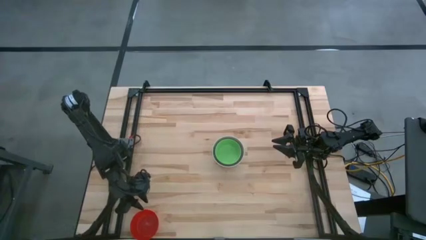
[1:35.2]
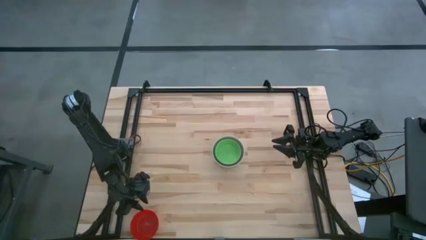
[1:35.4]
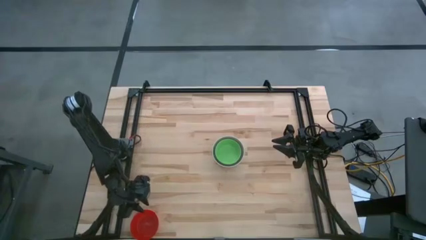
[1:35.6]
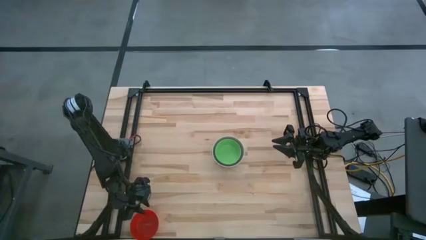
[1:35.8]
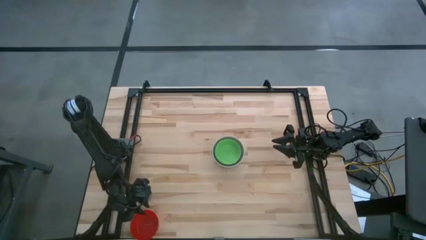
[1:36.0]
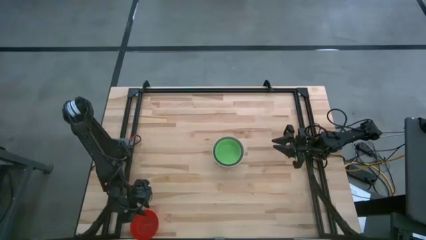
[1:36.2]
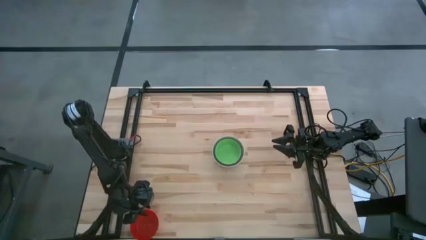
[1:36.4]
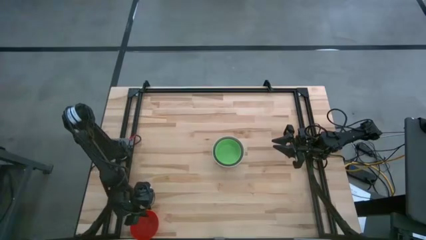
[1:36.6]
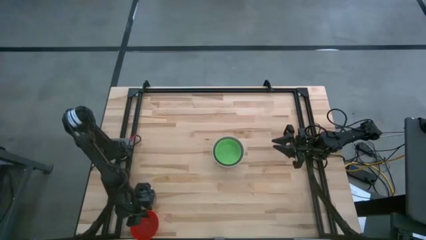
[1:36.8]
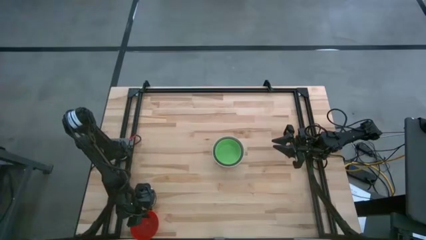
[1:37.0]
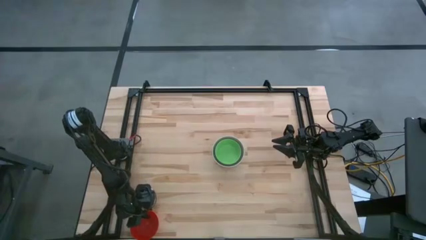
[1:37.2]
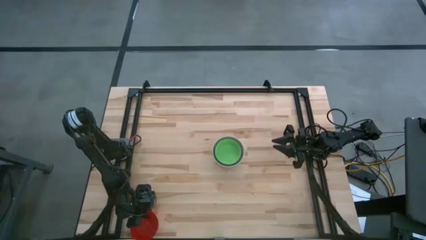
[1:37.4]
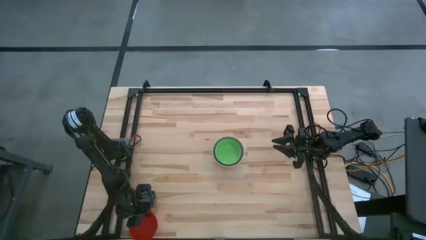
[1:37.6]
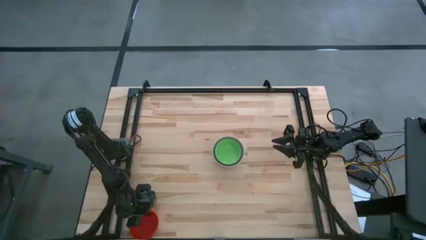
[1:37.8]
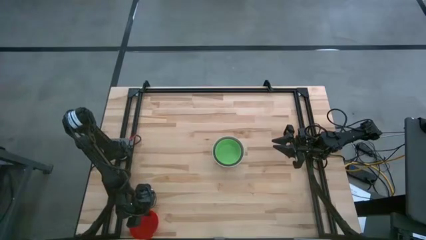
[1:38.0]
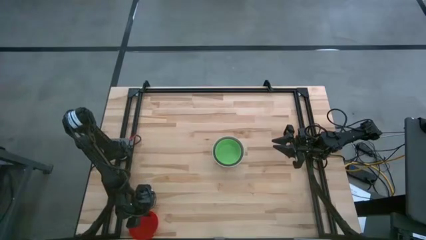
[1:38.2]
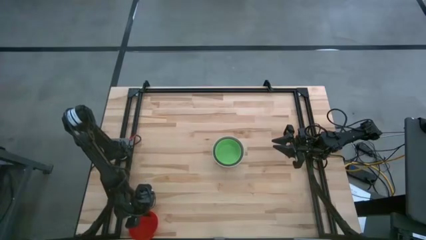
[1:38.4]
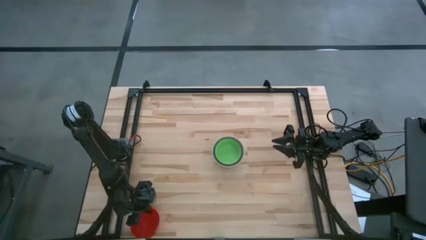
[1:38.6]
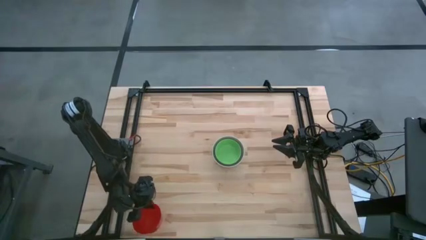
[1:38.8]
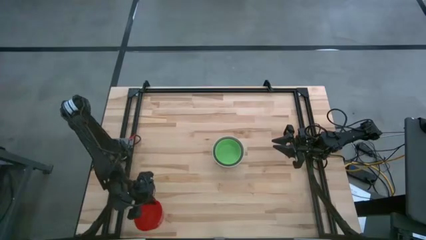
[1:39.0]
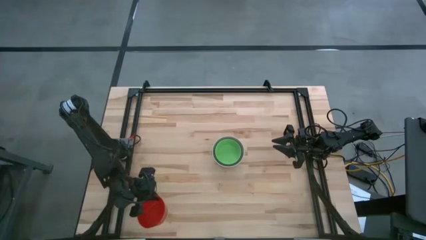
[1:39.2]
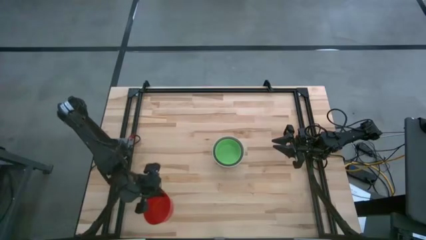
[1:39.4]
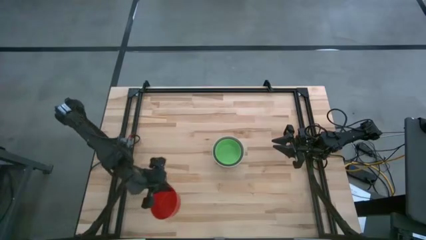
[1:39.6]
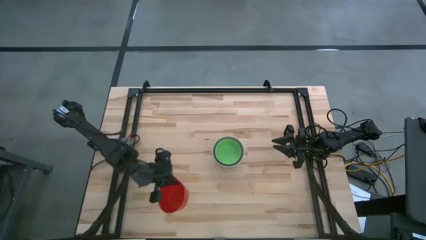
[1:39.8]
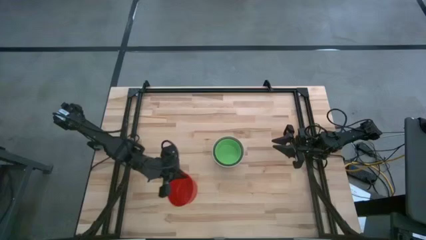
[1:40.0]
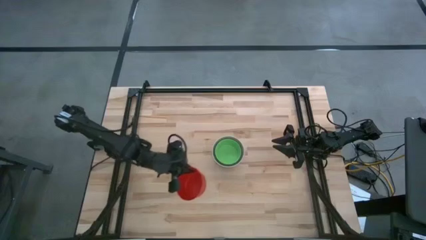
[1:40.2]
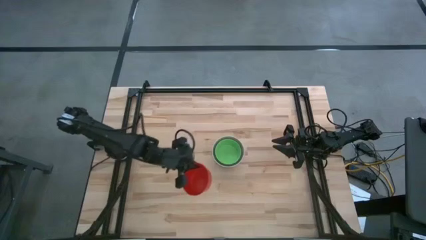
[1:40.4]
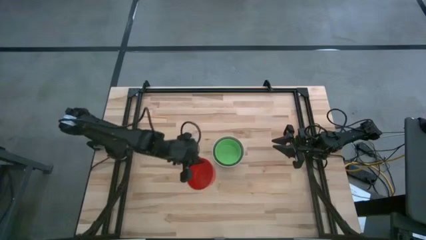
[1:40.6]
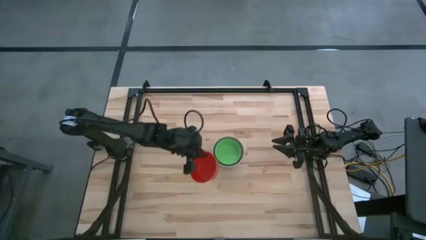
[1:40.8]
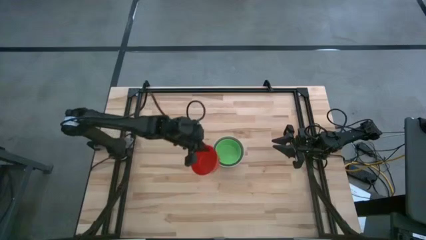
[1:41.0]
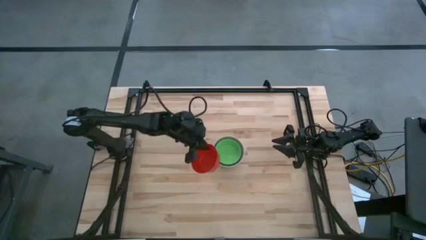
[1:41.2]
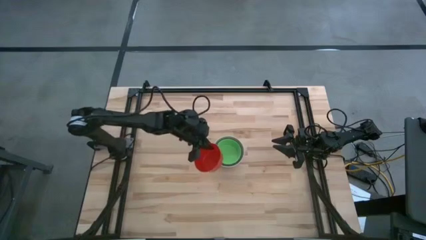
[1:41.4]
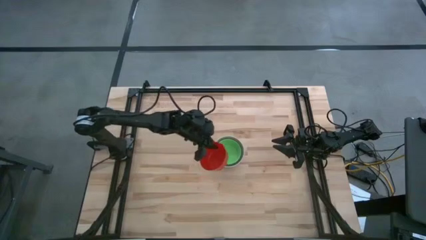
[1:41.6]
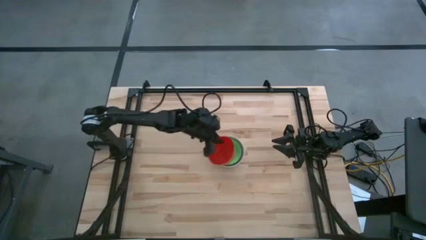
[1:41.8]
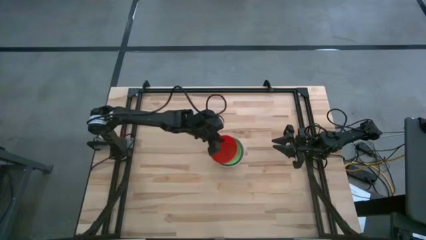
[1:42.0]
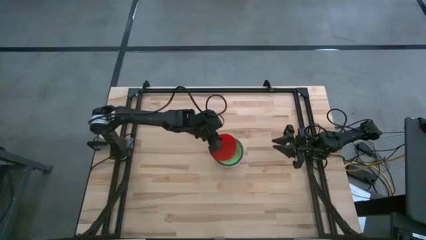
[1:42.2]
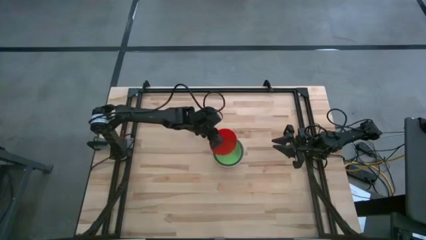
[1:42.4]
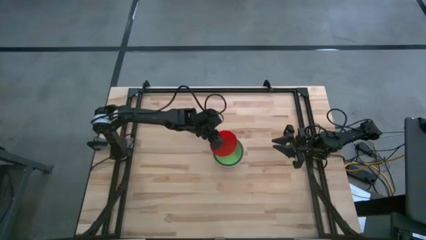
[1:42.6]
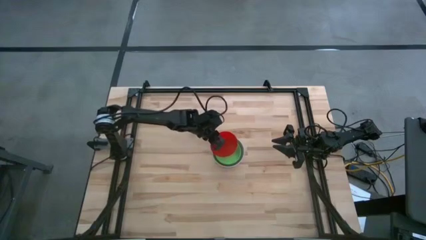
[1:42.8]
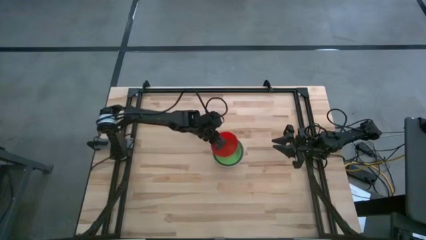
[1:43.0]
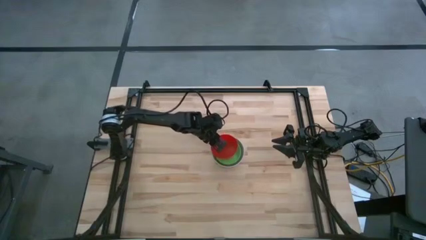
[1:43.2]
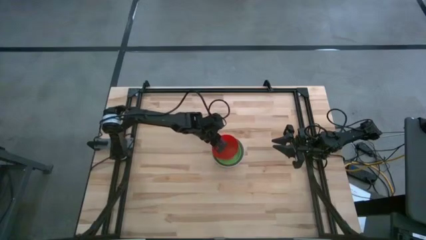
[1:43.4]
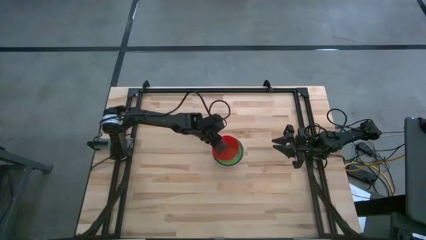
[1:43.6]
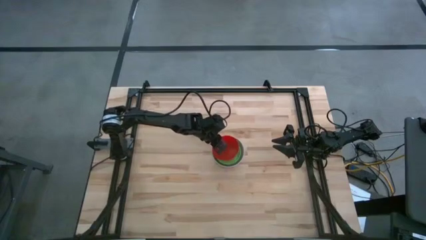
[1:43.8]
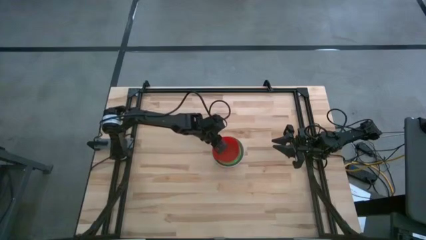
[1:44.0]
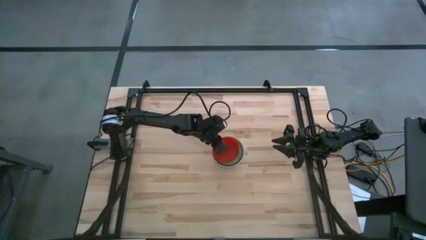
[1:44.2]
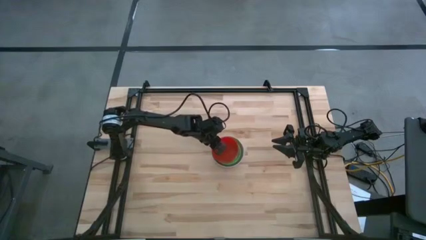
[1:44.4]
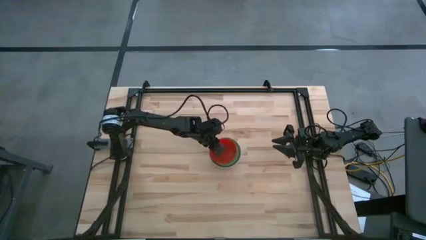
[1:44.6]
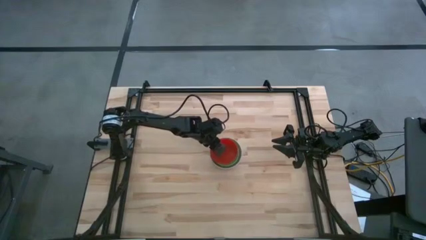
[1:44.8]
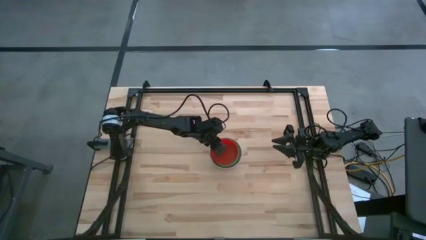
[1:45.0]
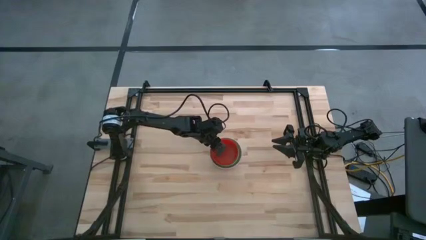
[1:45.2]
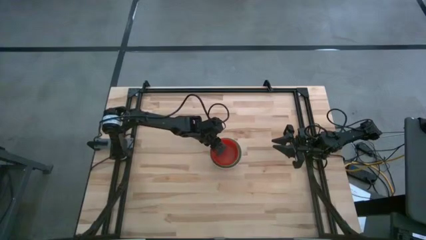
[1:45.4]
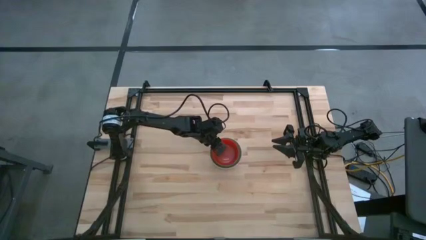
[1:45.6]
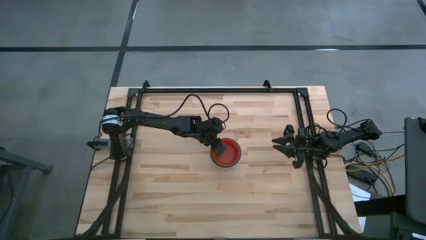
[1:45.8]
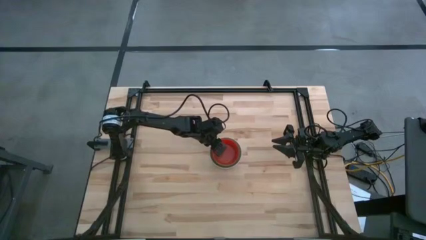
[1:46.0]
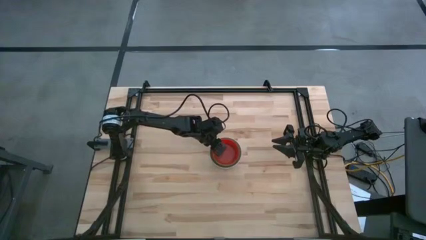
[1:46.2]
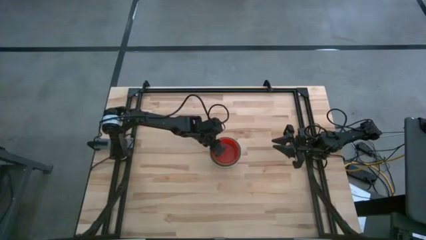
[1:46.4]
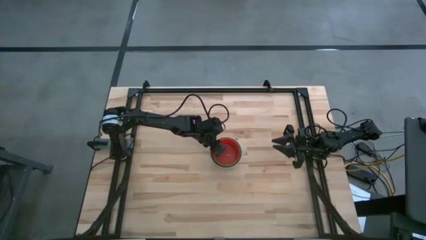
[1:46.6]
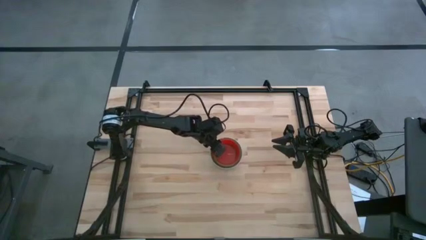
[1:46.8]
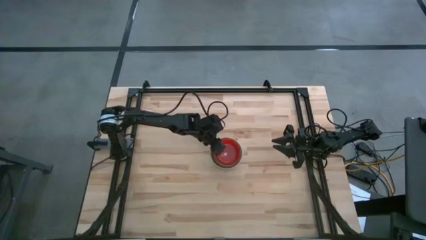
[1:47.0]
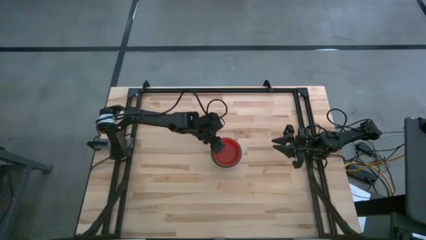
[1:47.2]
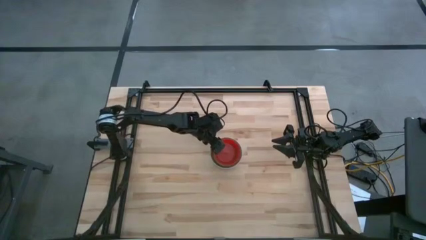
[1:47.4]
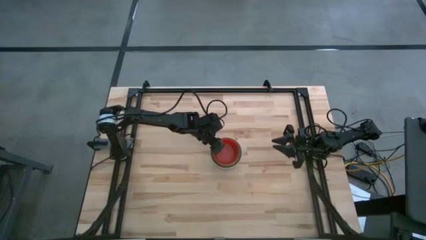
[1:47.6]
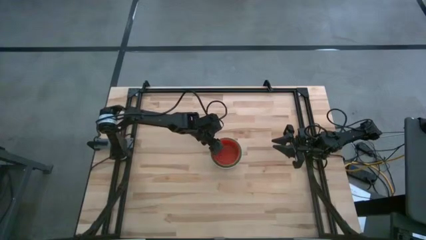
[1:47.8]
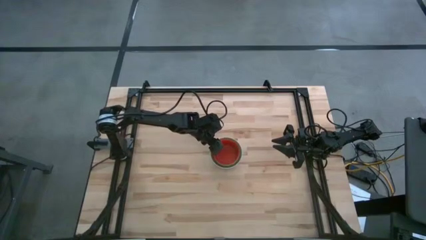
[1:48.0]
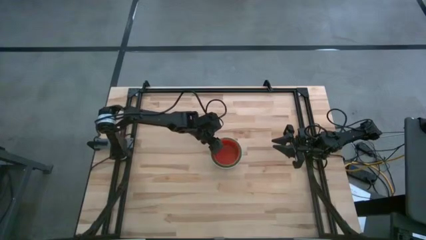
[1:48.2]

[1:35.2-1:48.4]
Stack the red bowl on top of the green bowl
